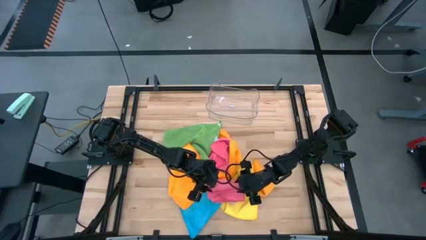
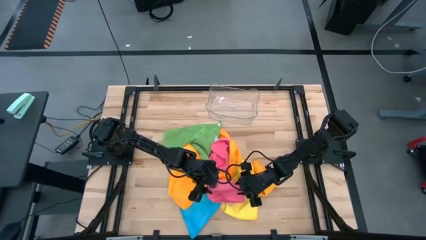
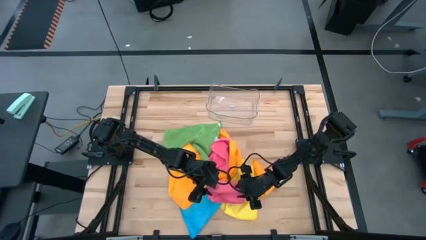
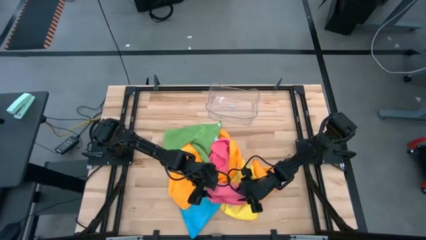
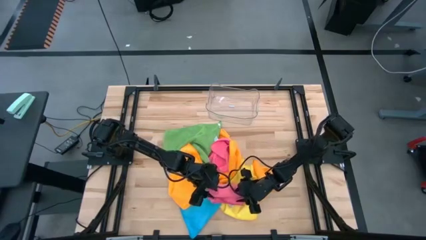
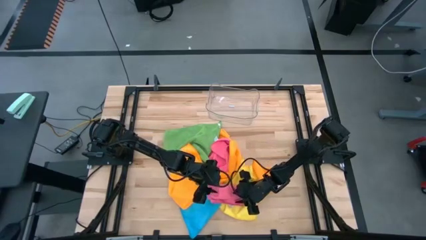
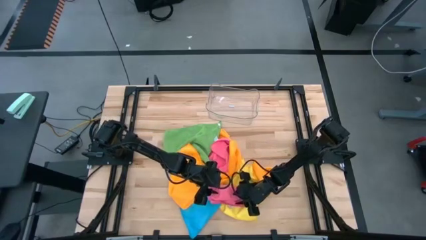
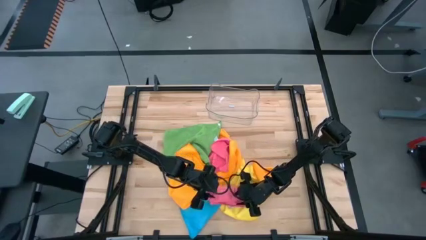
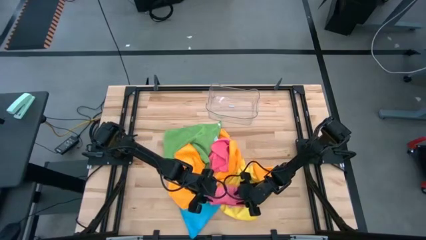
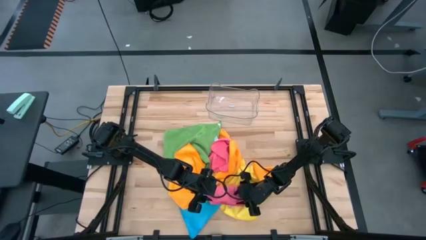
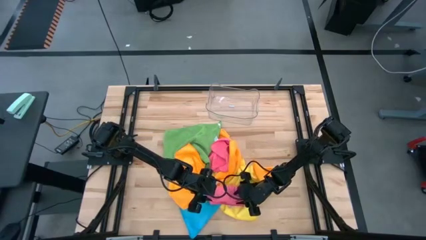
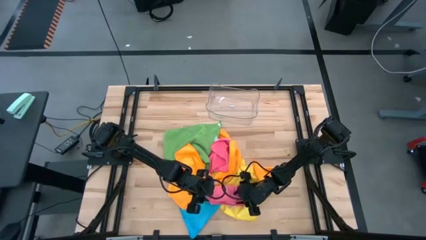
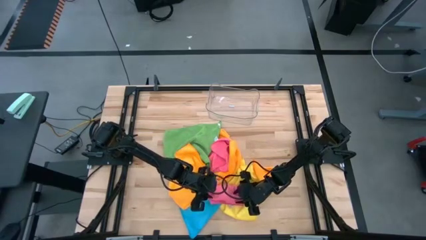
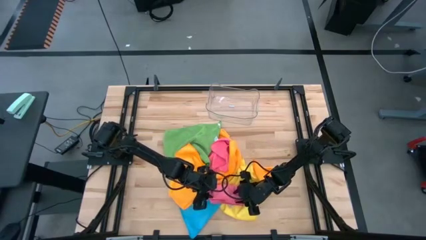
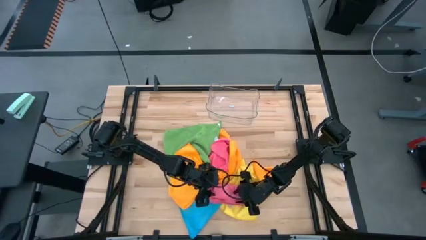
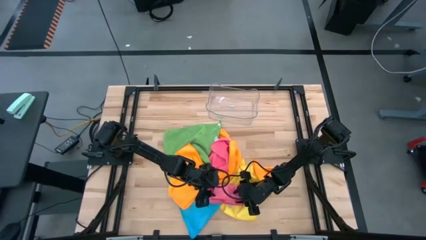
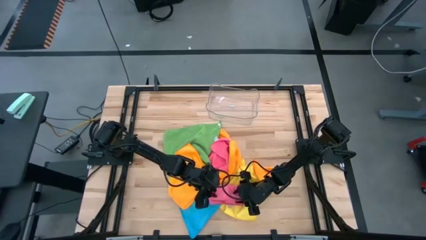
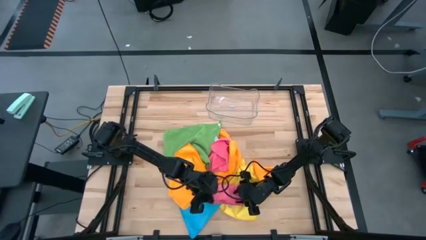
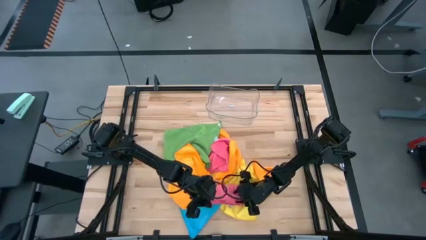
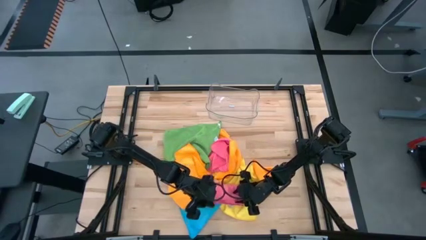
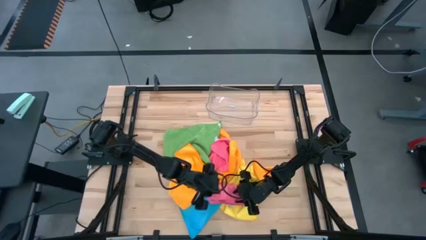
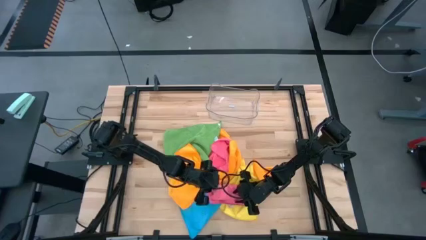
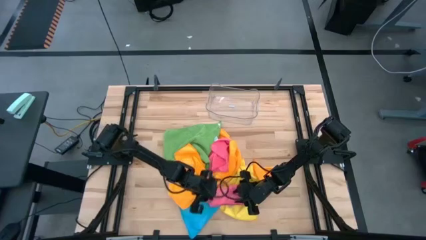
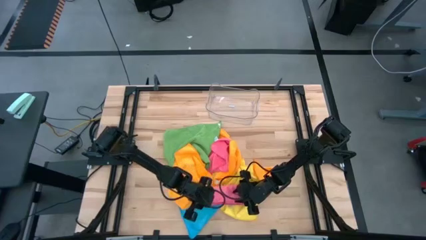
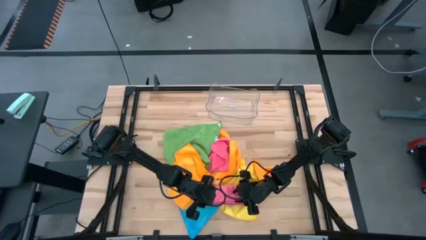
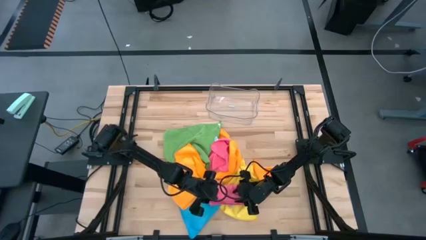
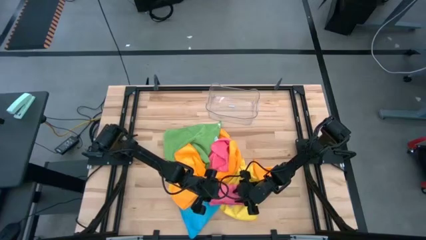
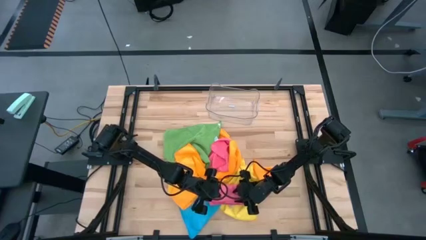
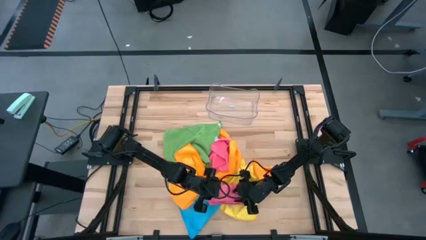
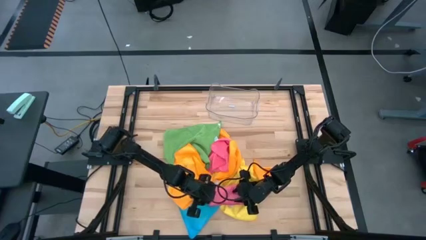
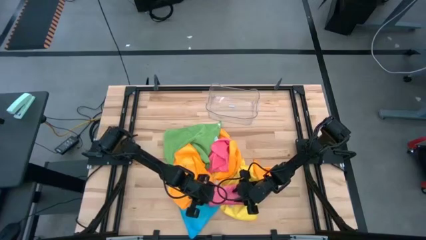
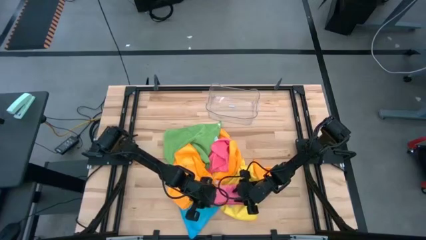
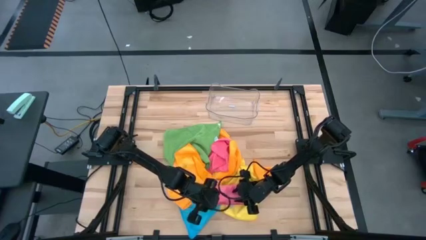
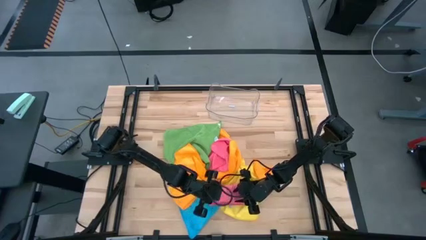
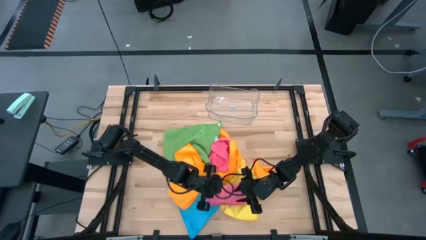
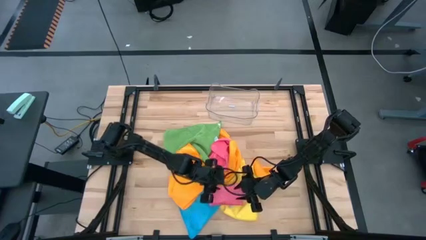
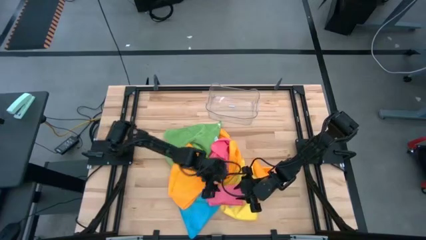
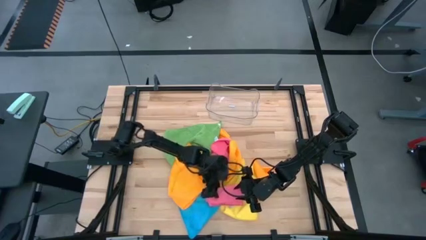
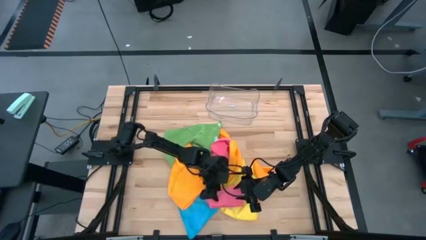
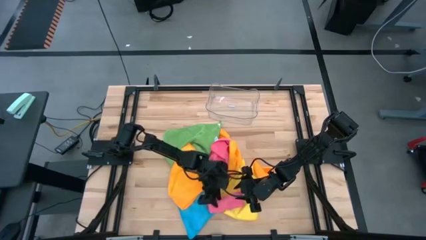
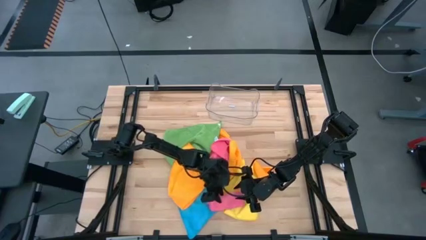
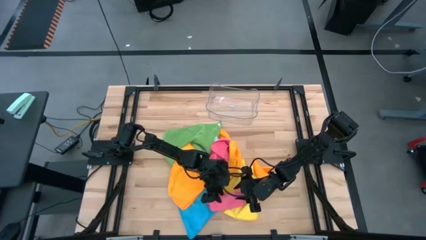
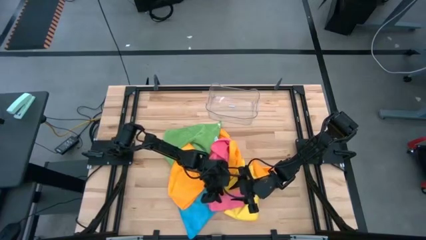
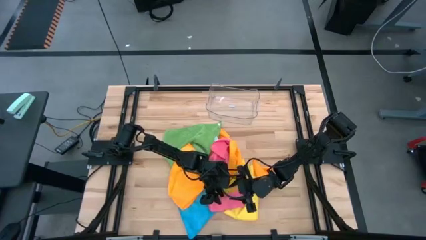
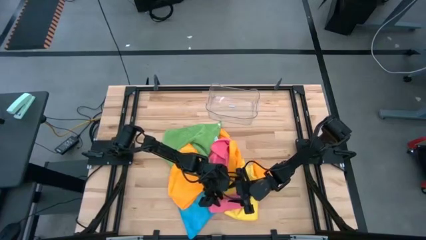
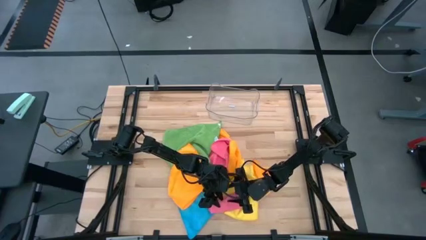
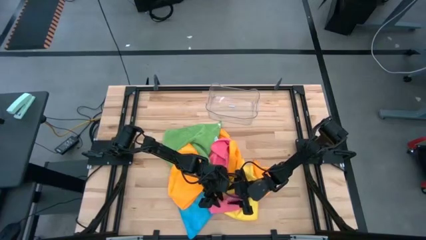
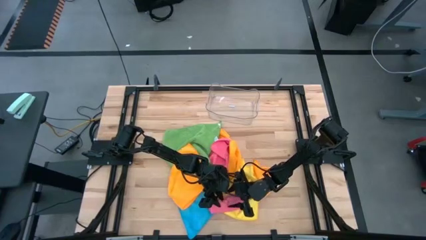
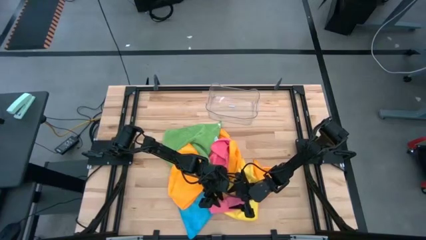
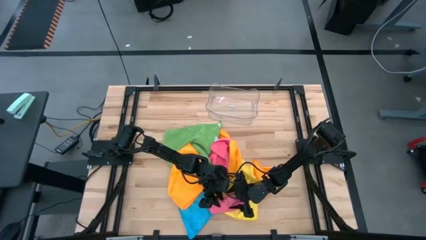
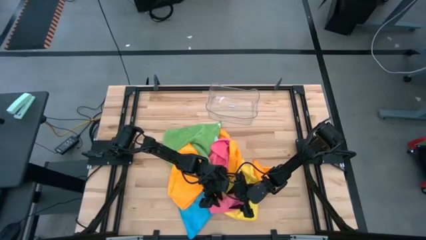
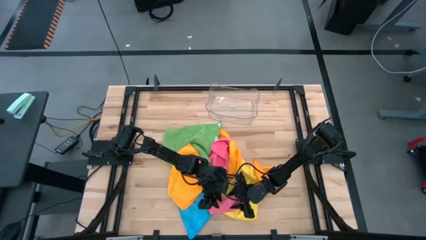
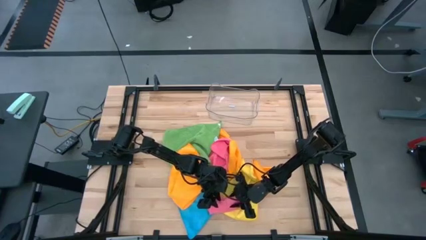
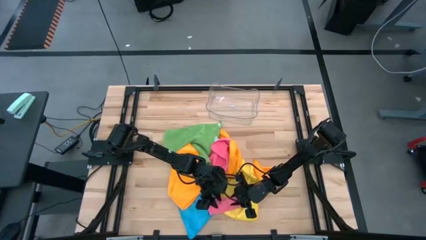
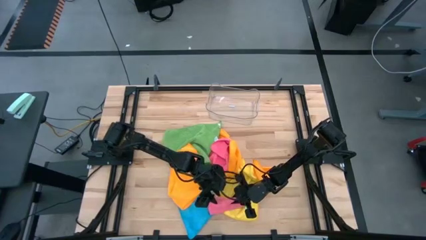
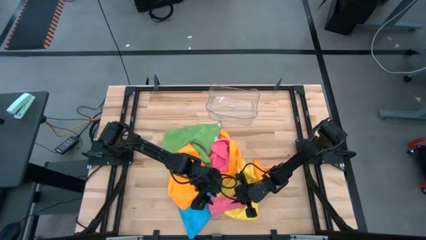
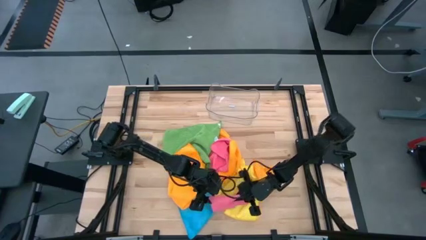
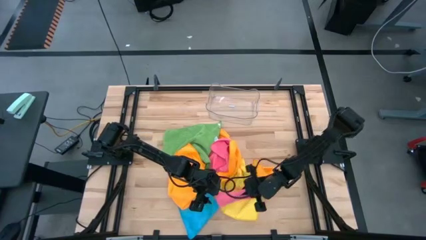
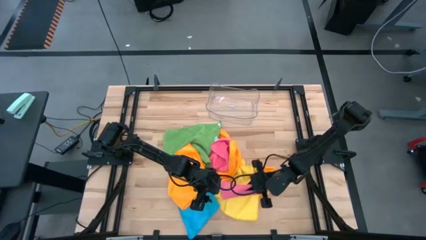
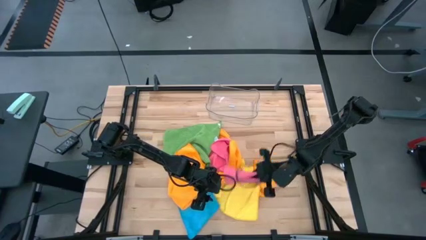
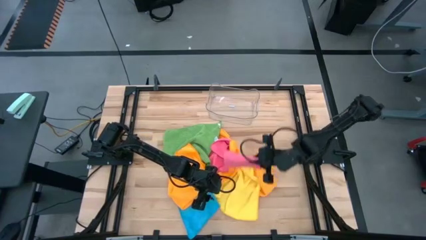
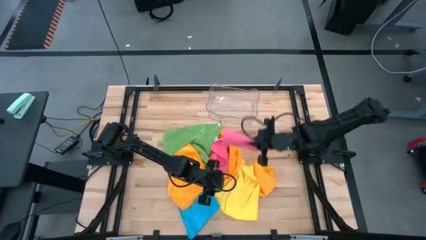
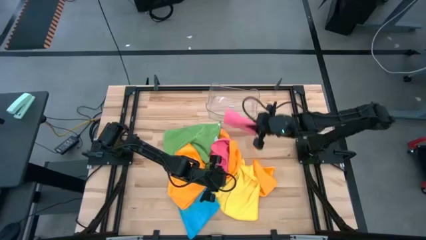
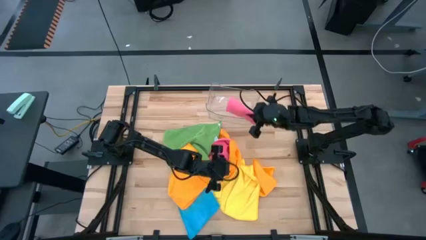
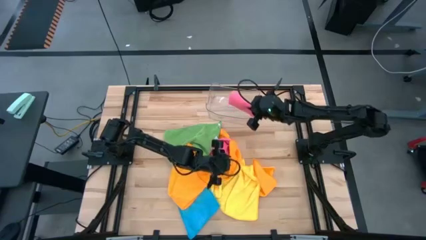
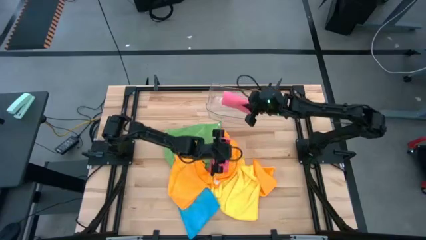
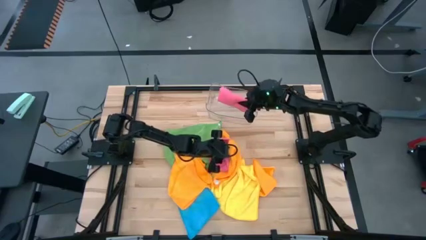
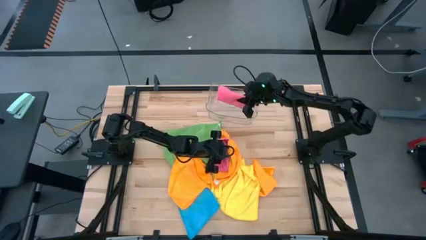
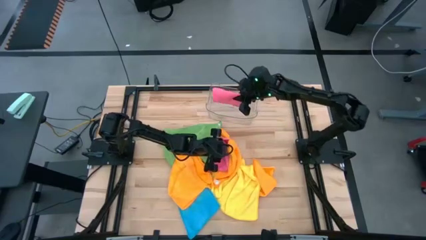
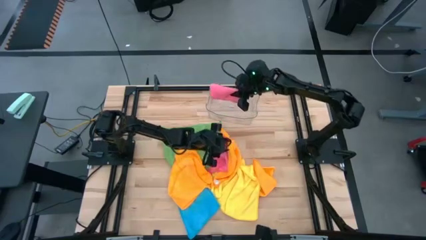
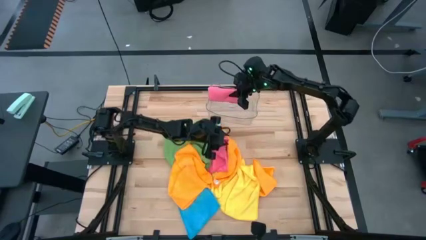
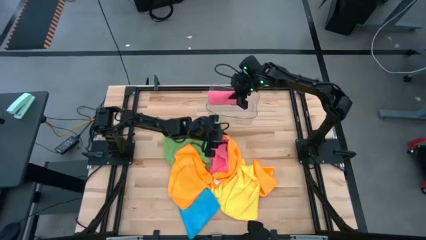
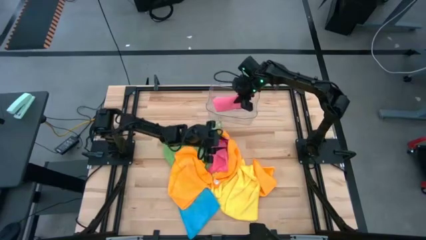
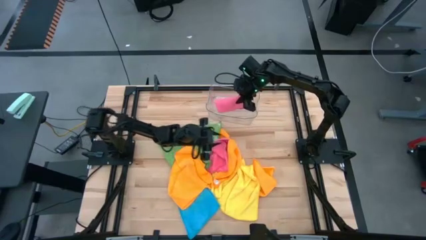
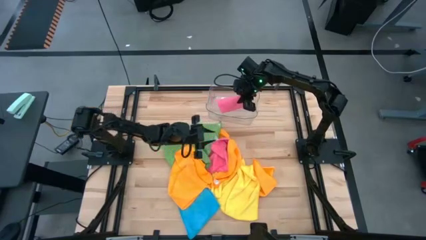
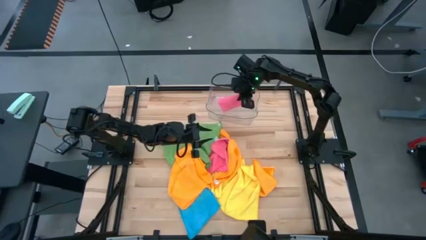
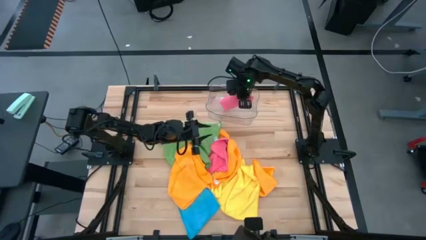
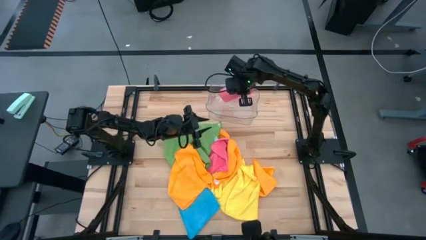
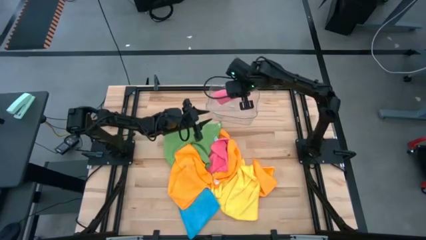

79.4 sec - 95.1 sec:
Task: Fold microfiber towels
Fold the pink microfiber cloth
